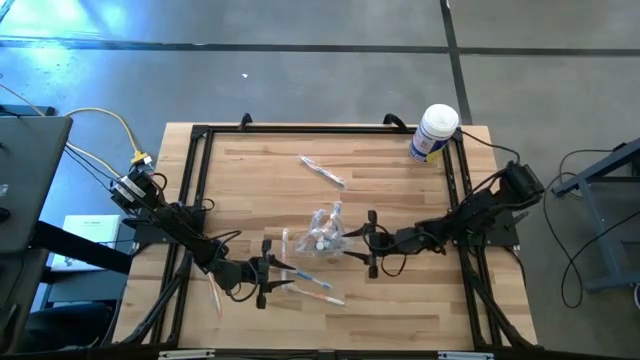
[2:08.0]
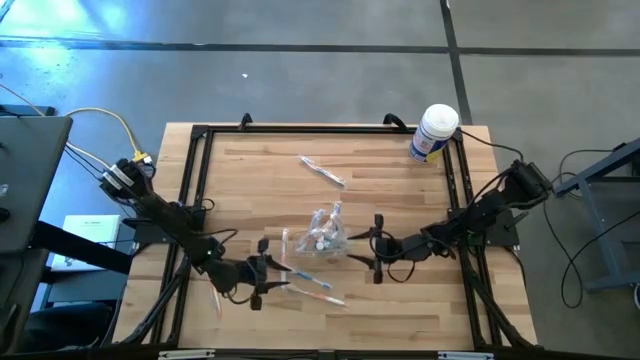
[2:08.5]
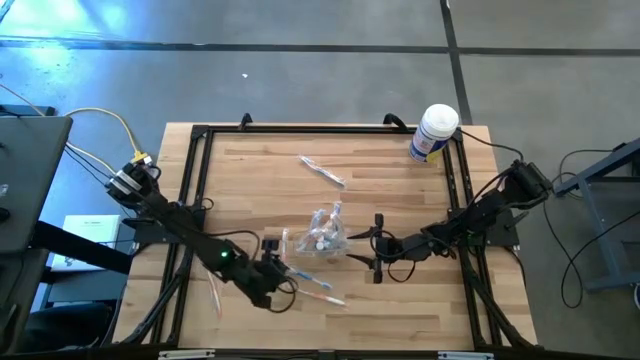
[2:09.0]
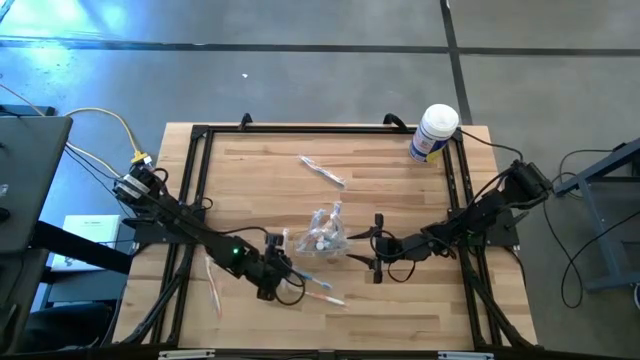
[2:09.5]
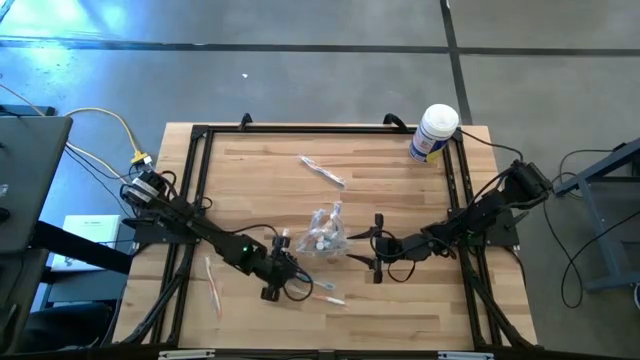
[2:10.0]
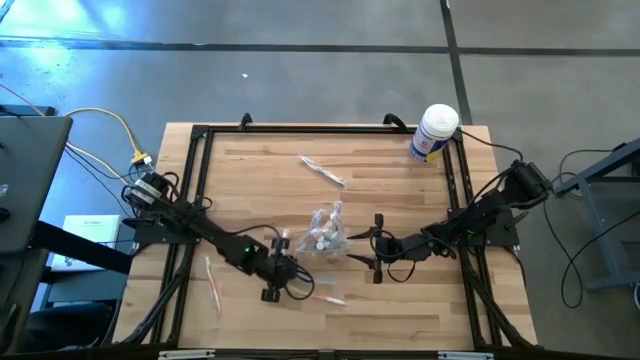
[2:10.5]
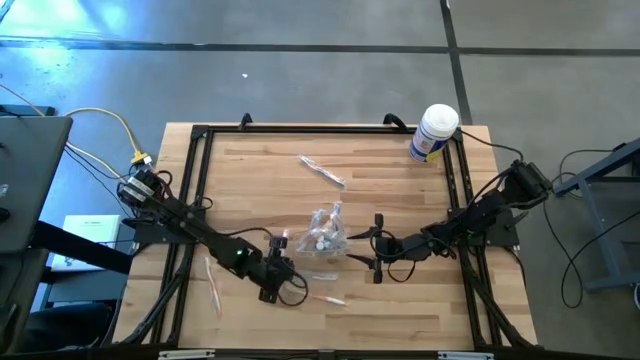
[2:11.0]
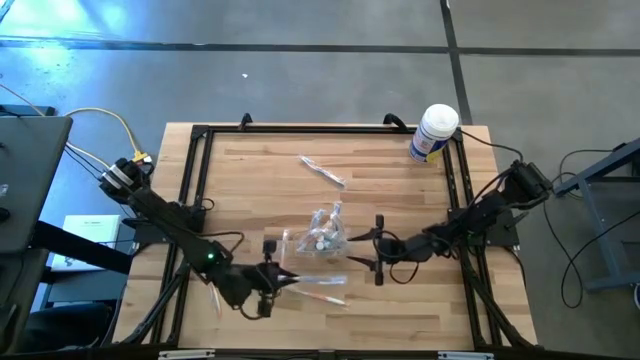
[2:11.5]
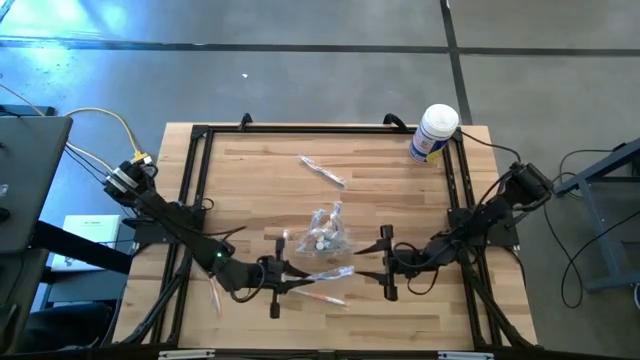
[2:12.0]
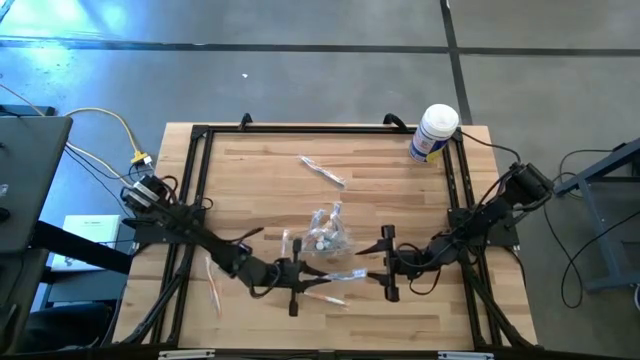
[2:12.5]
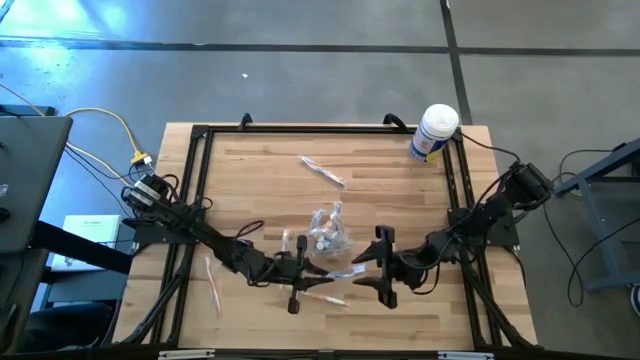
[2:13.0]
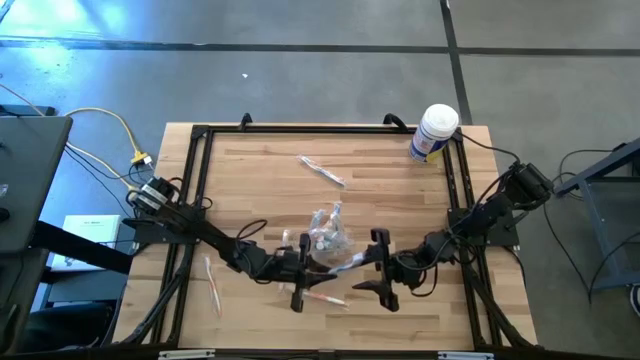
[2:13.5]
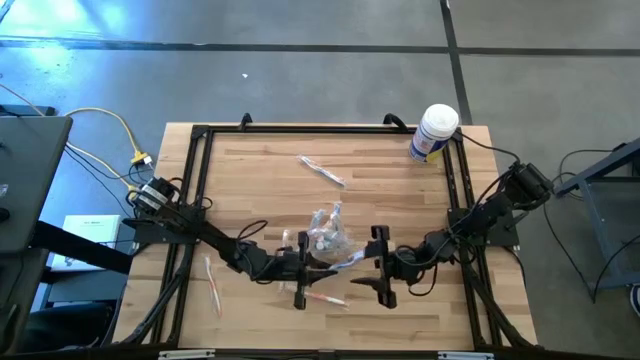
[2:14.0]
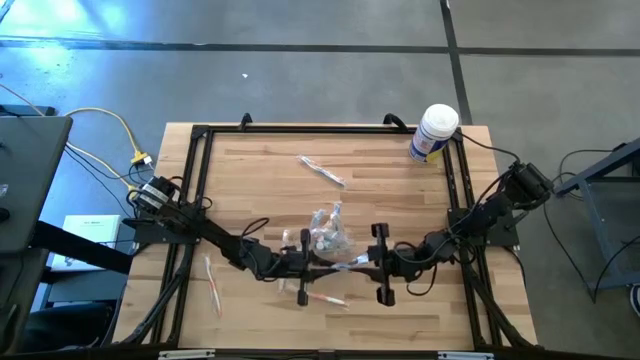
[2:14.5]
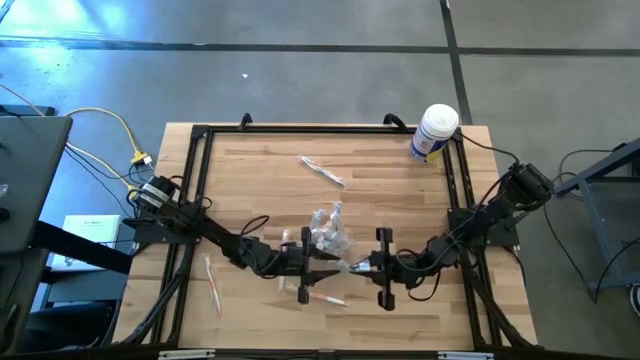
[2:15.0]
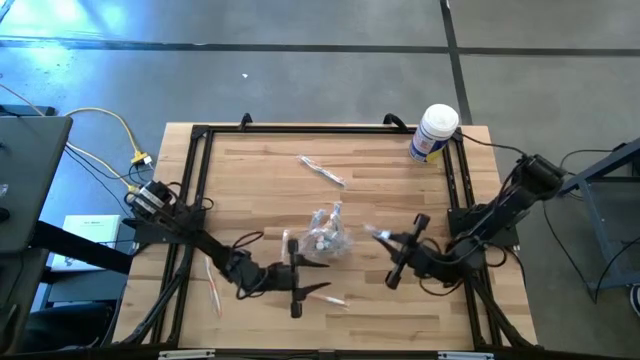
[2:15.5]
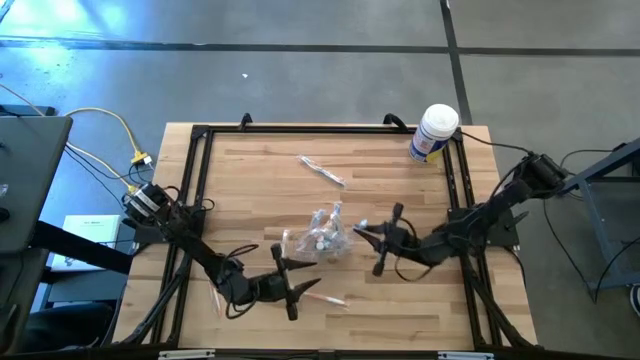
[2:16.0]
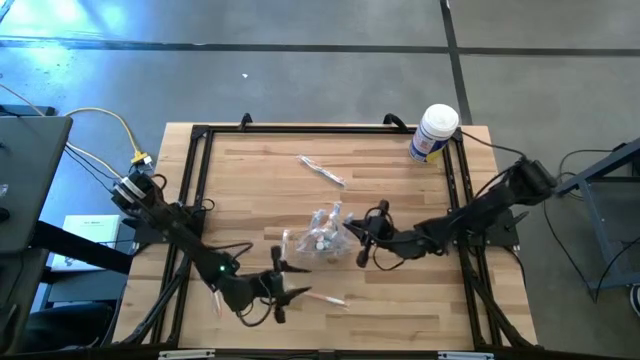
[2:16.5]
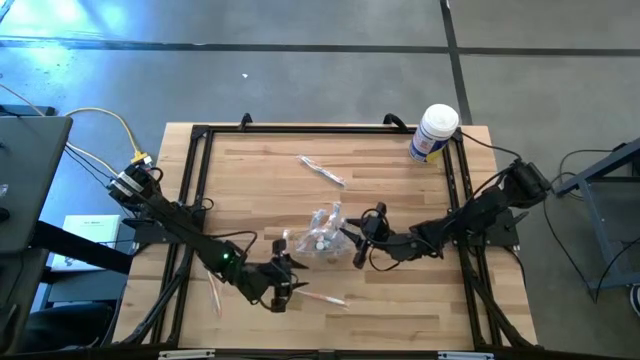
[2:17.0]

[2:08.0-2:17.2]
Task: Pick & Place toothbrushing station
Put the blue toothbrush into the transparent organizer

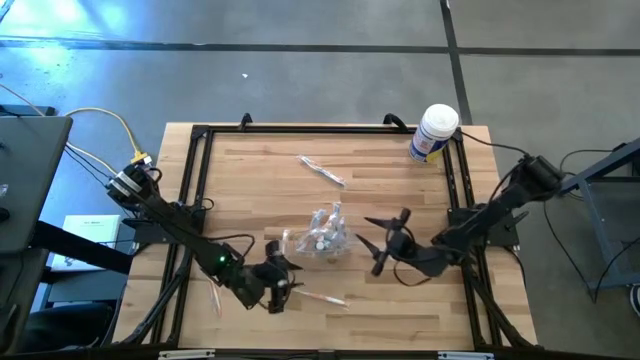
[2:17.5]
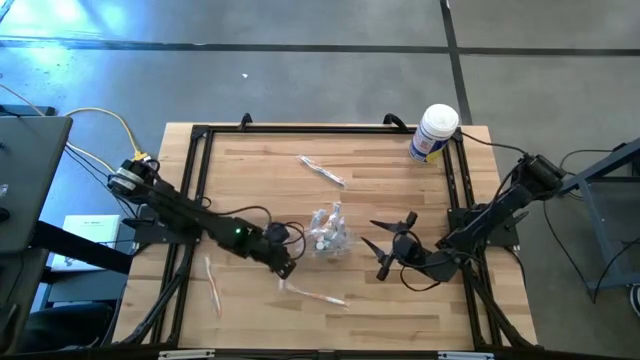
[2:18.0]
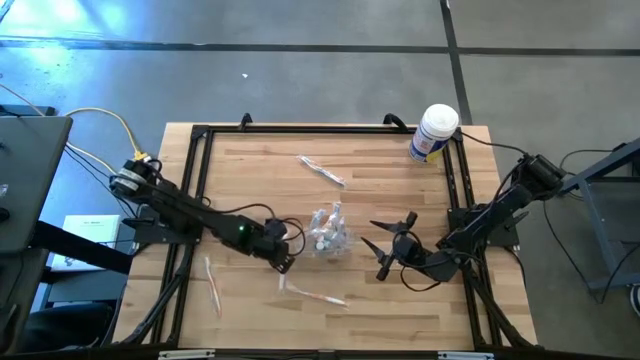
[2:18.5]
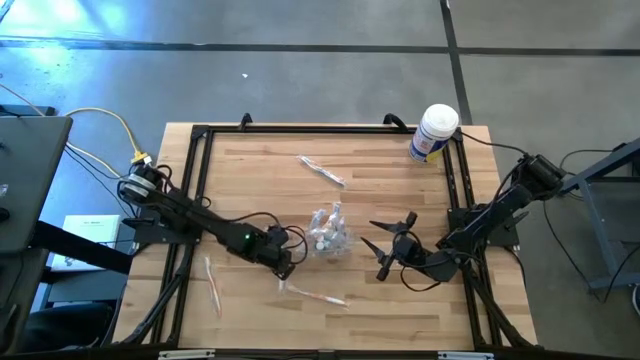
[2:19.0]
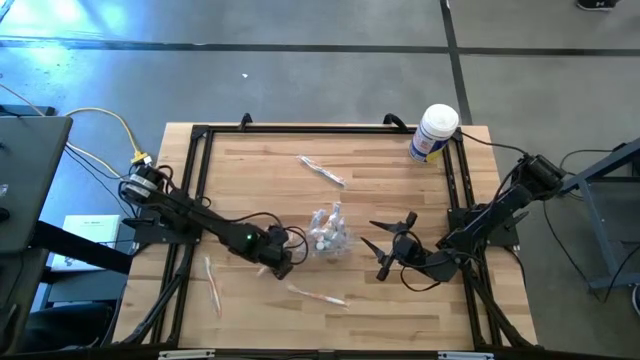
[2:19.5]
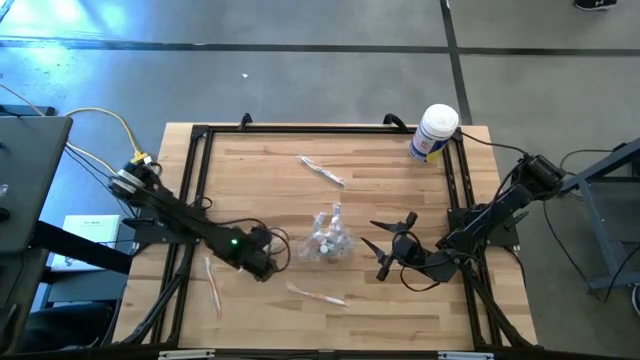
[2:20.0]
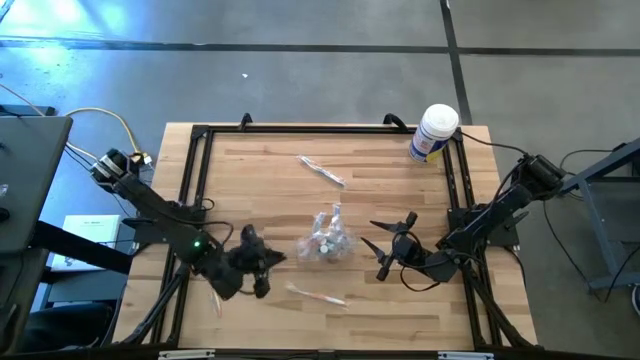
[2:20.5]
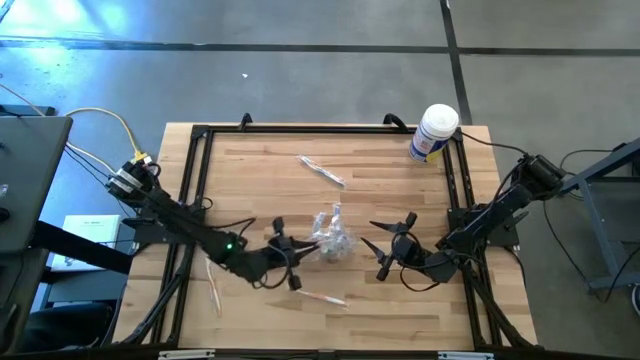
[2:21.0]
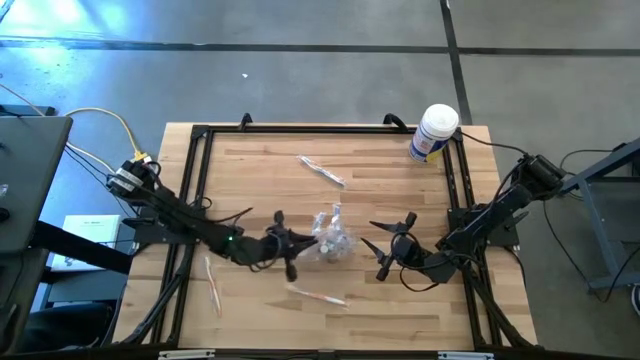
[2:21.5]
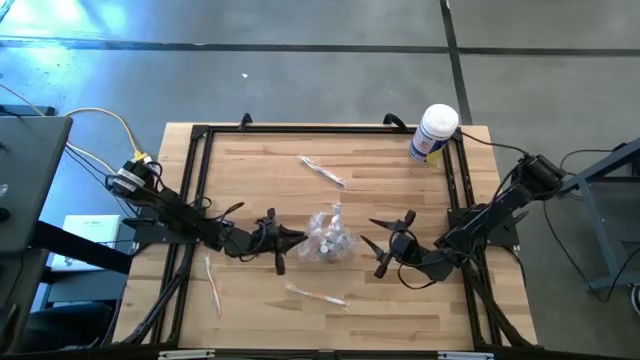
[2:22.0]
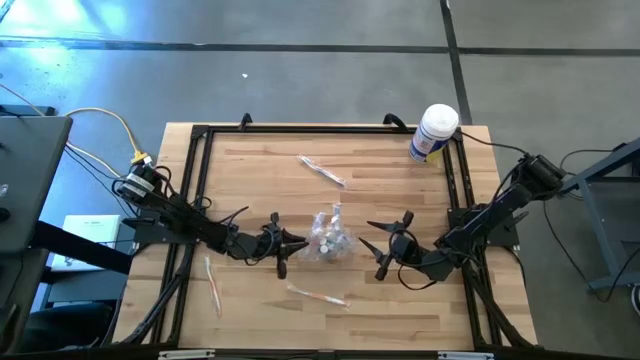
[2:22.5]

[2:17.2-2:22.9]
Put the orange toothbrush into the transparent organizer

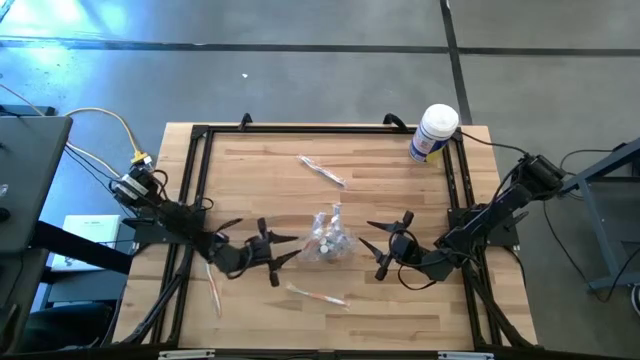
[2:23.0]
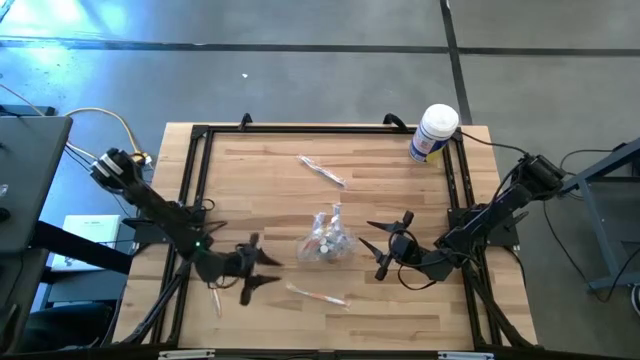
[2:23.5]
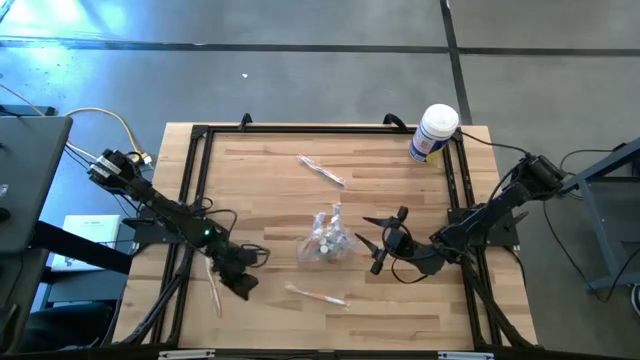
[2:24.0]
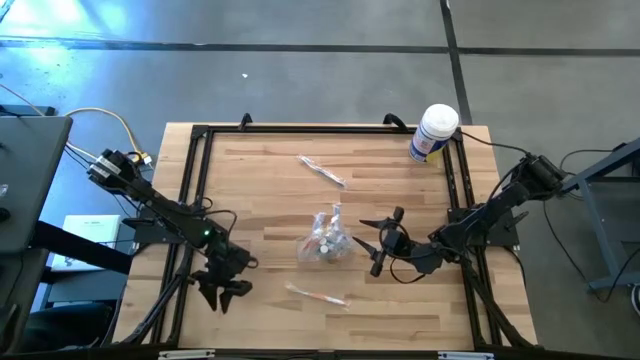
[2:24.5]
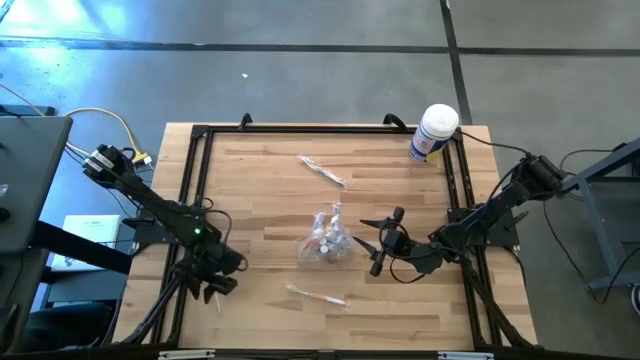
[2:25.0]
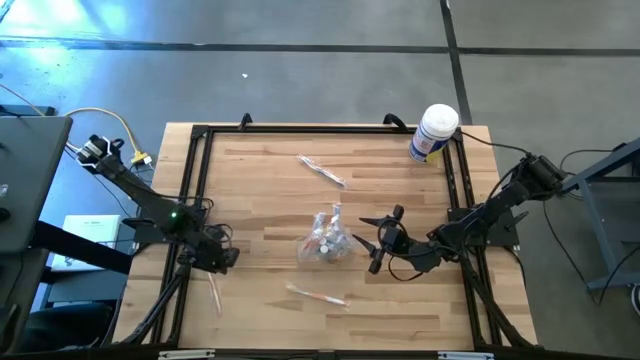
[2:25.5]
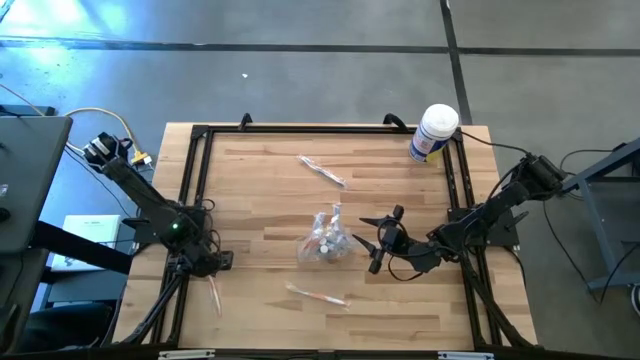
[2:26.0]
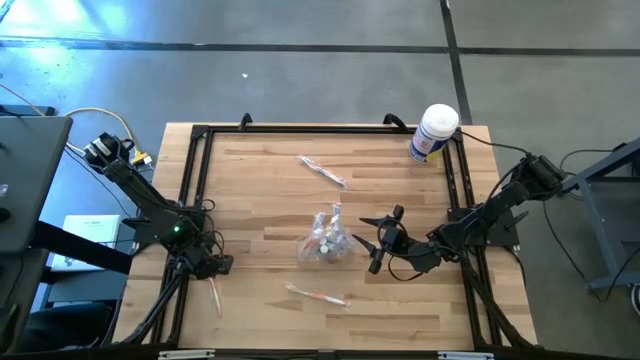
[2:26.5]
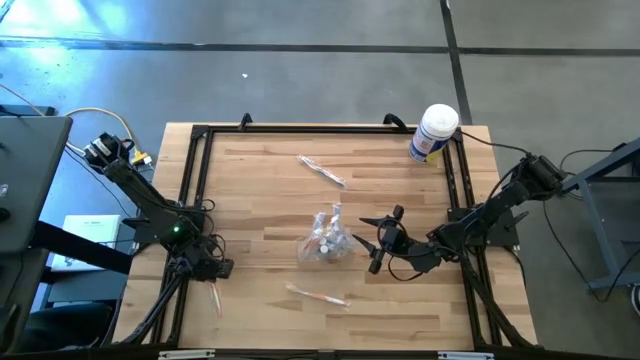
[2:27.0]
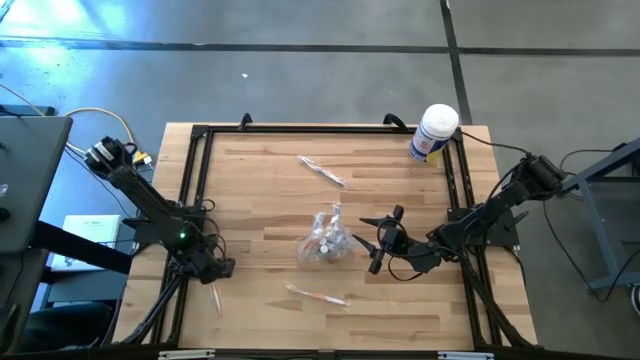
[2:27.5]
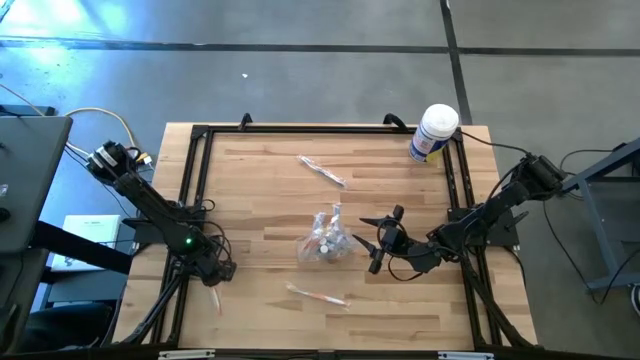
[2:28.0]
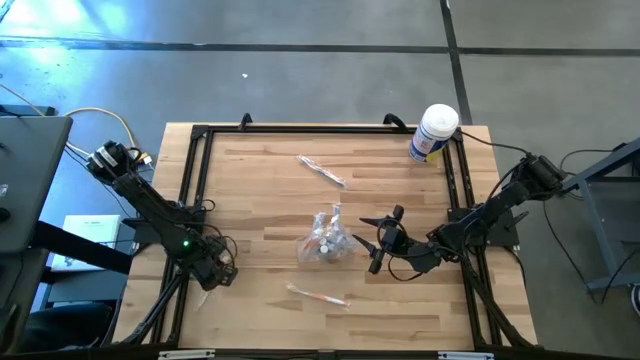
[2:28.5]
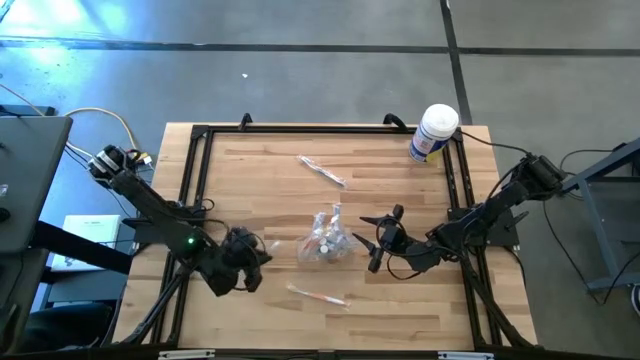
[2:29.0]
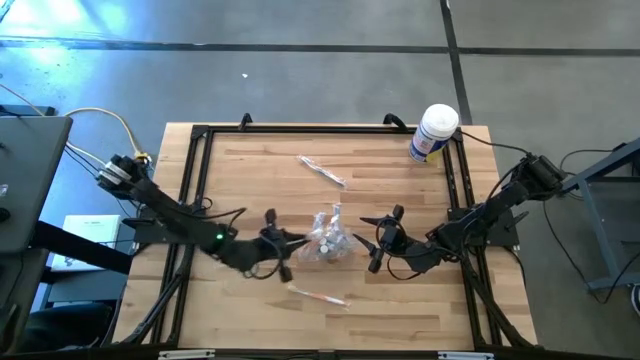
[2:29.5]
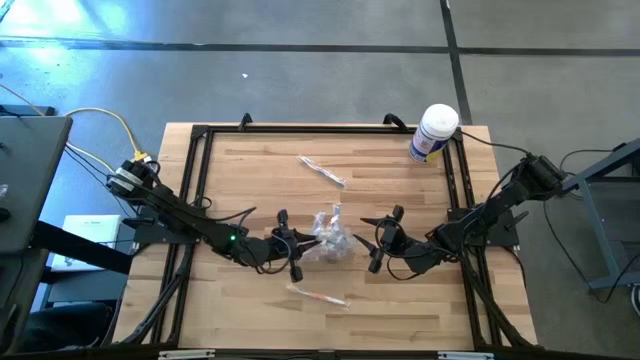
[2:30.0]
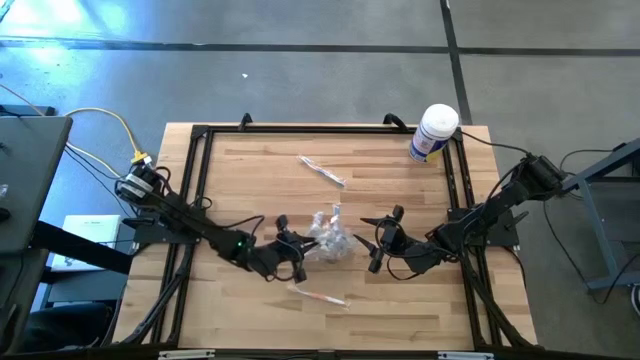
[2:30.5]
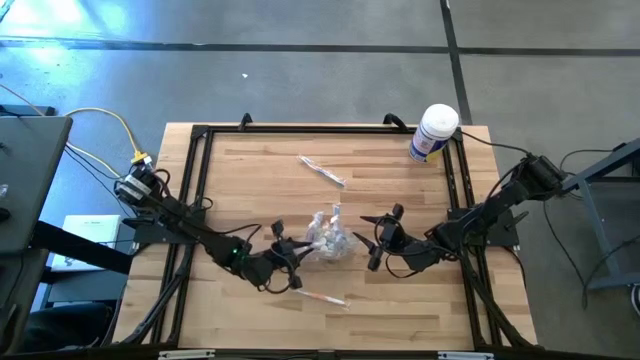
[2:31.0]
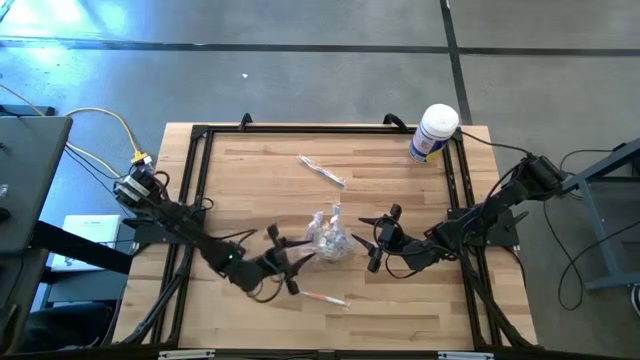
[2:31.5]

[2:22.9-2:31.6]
Put the orange toothbrush into the transparent organizer
